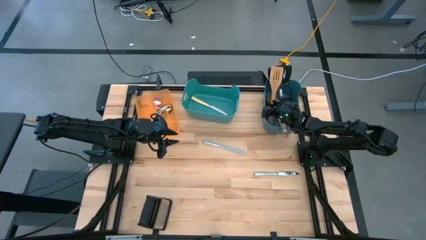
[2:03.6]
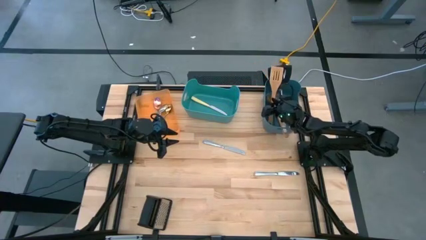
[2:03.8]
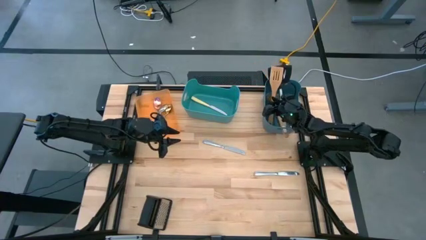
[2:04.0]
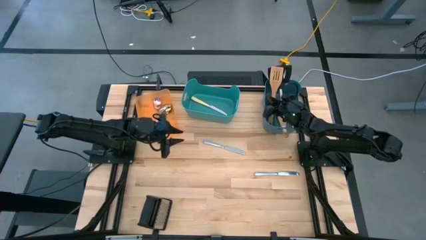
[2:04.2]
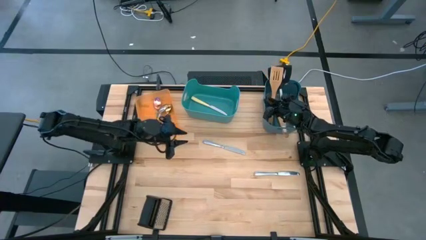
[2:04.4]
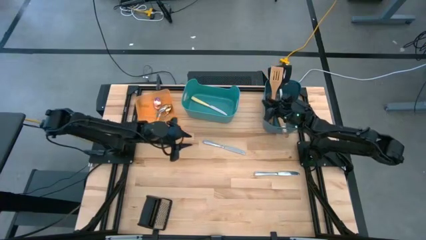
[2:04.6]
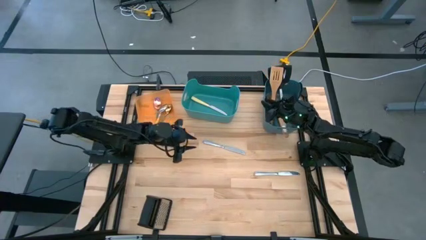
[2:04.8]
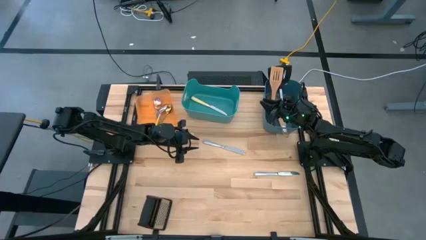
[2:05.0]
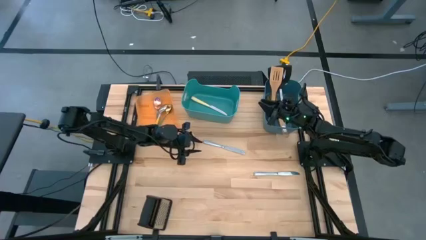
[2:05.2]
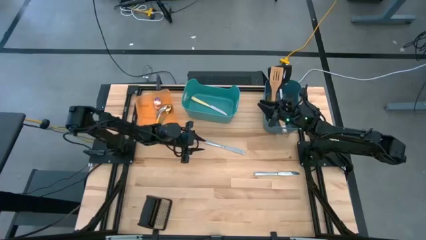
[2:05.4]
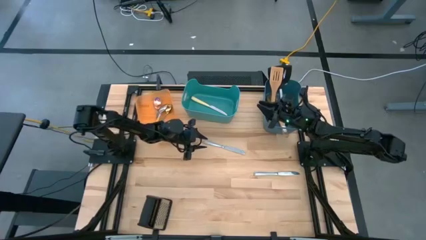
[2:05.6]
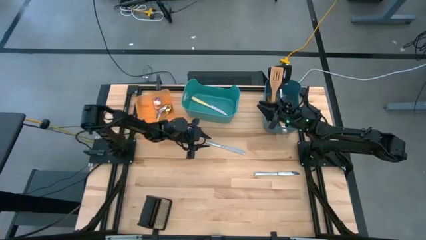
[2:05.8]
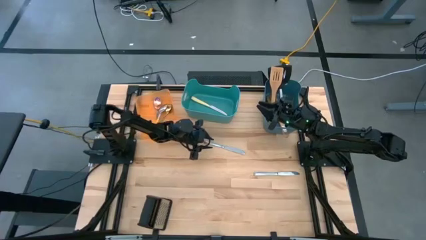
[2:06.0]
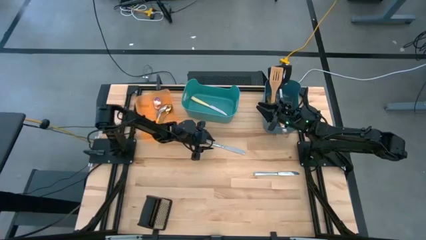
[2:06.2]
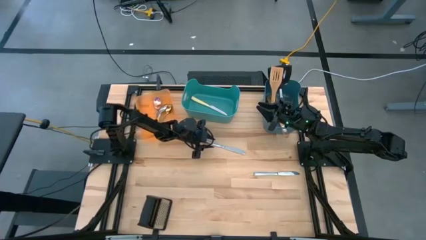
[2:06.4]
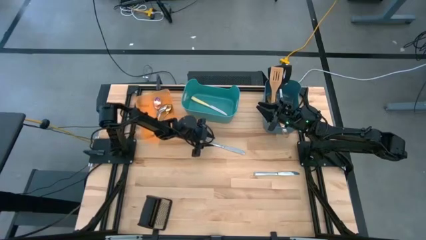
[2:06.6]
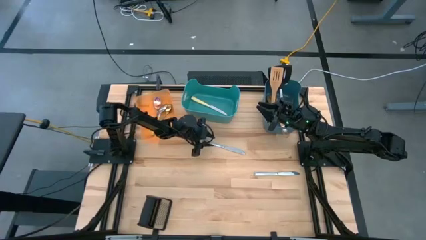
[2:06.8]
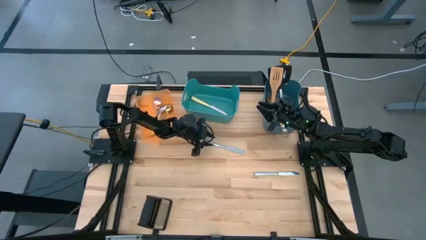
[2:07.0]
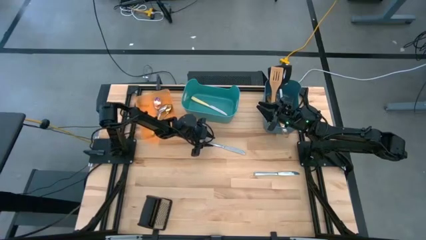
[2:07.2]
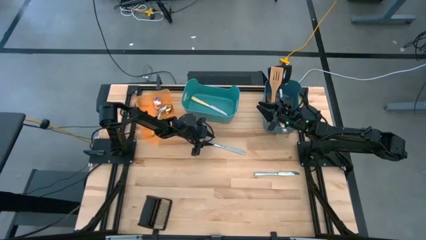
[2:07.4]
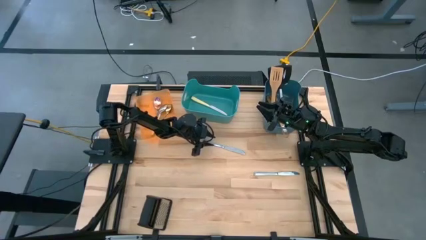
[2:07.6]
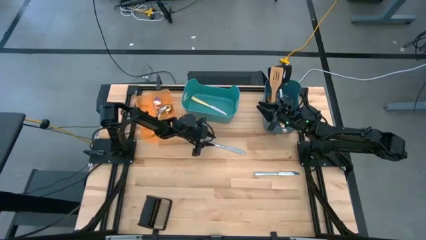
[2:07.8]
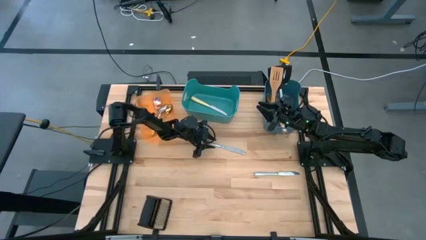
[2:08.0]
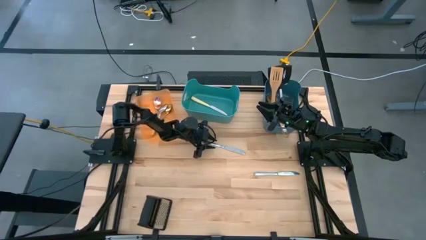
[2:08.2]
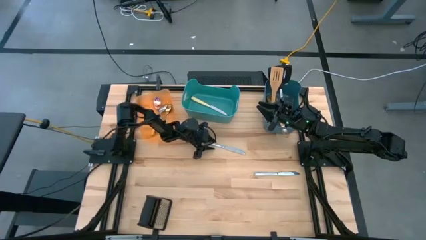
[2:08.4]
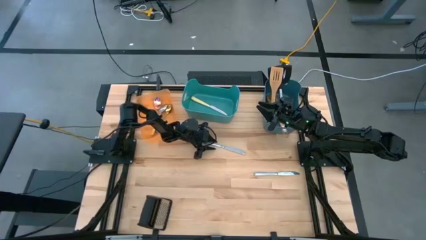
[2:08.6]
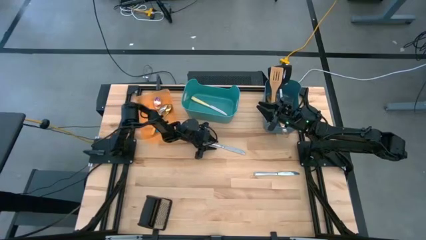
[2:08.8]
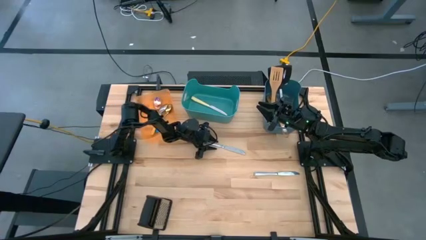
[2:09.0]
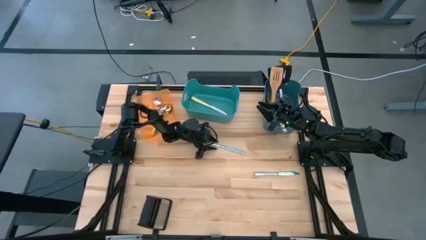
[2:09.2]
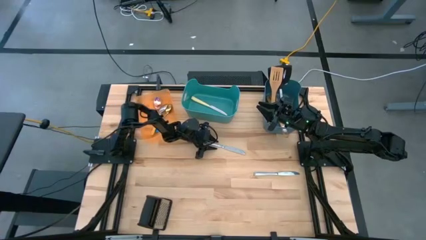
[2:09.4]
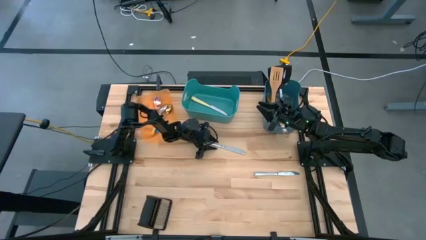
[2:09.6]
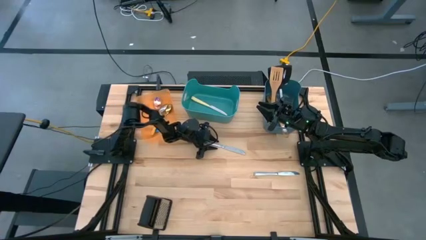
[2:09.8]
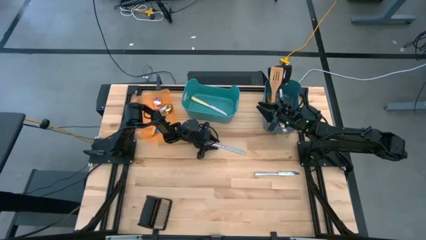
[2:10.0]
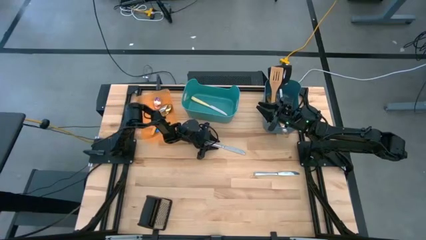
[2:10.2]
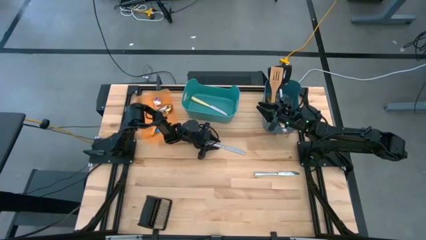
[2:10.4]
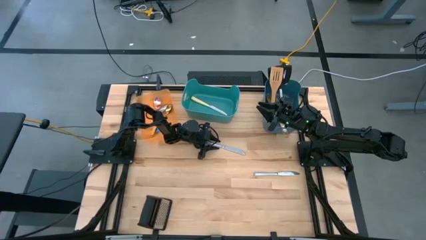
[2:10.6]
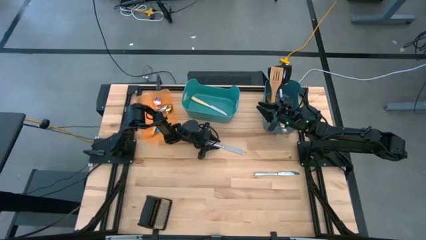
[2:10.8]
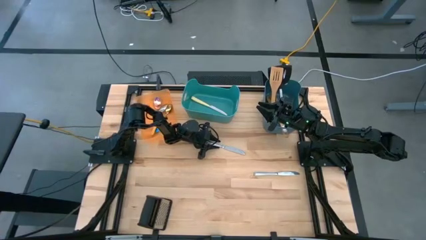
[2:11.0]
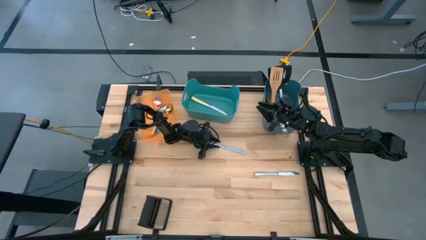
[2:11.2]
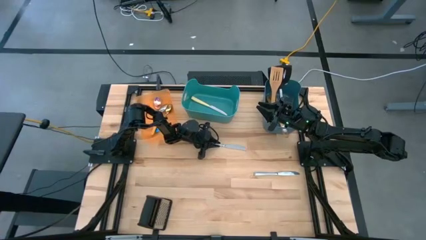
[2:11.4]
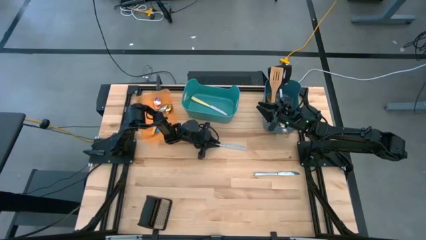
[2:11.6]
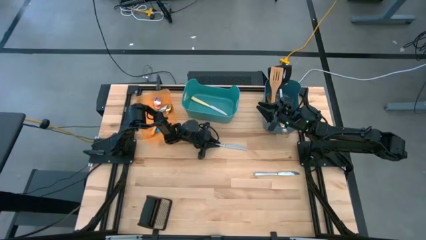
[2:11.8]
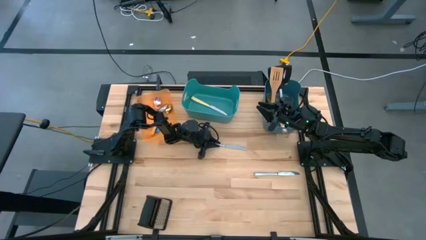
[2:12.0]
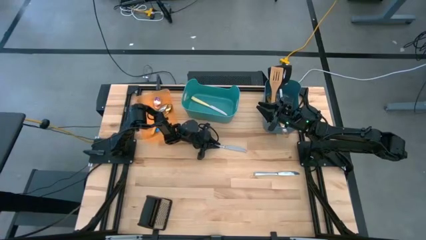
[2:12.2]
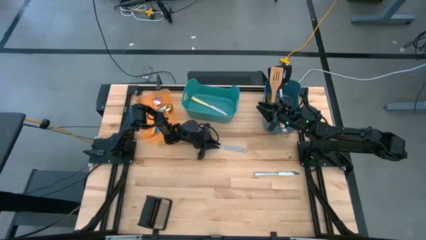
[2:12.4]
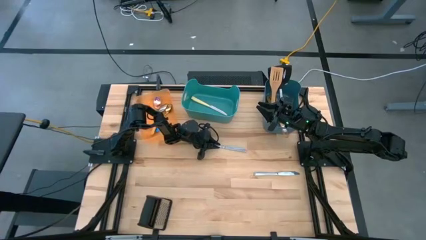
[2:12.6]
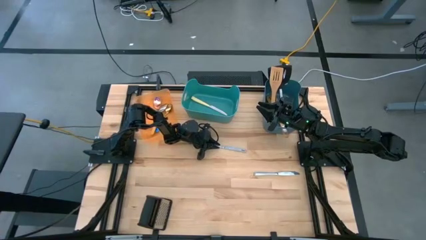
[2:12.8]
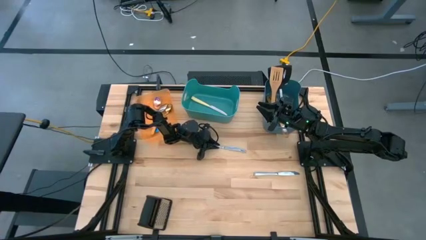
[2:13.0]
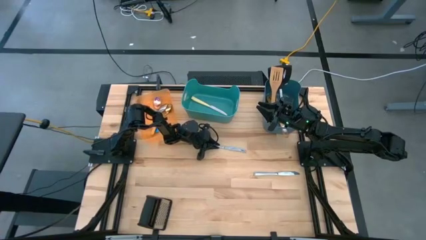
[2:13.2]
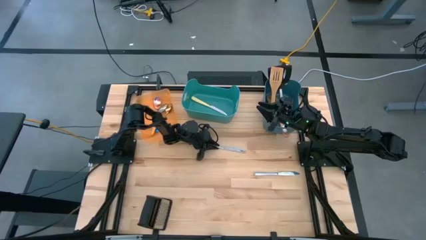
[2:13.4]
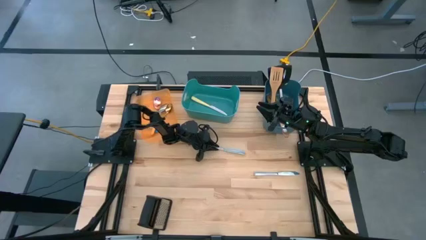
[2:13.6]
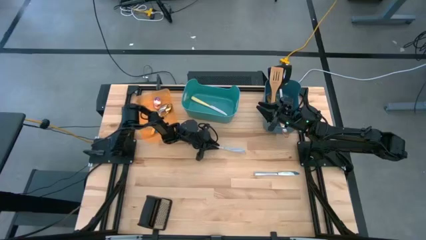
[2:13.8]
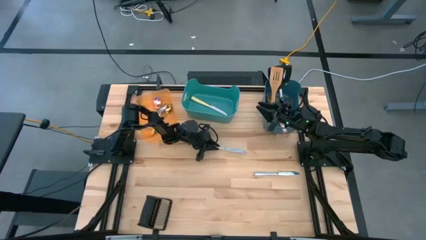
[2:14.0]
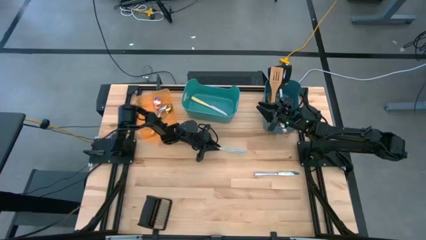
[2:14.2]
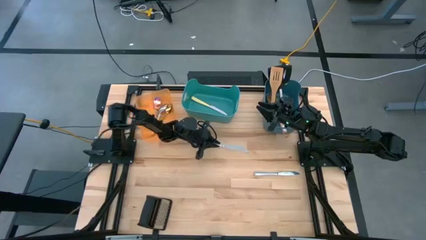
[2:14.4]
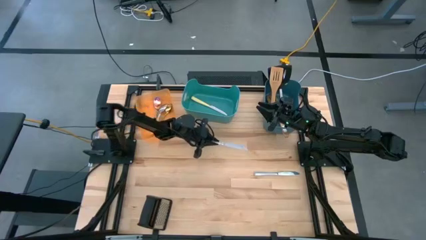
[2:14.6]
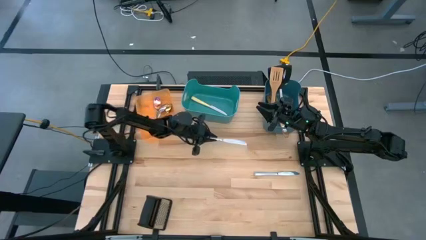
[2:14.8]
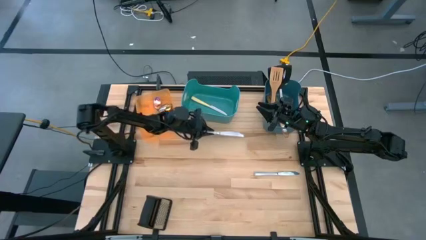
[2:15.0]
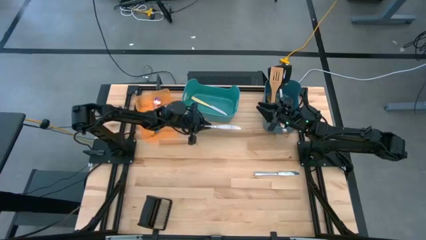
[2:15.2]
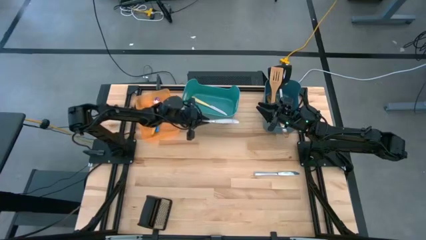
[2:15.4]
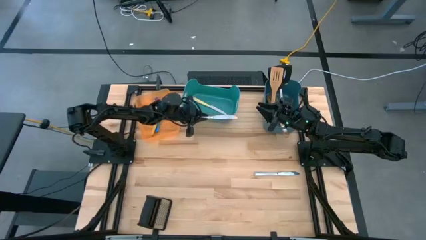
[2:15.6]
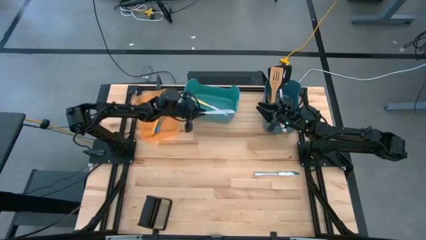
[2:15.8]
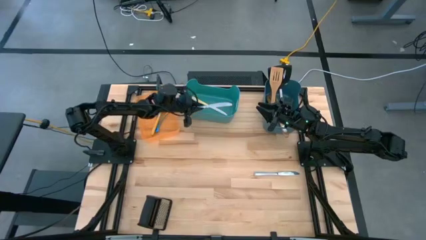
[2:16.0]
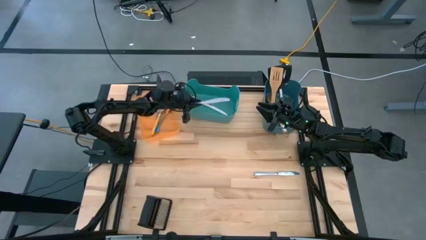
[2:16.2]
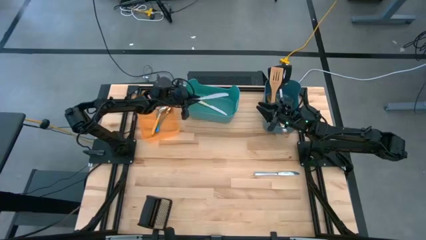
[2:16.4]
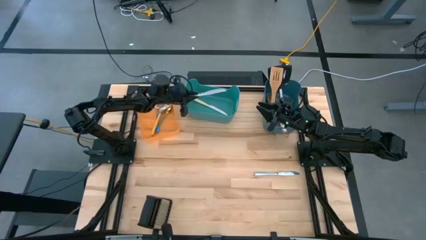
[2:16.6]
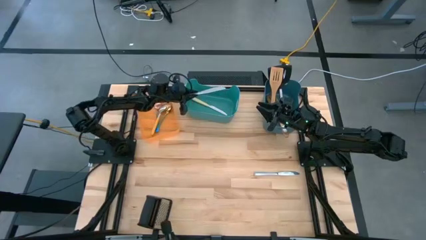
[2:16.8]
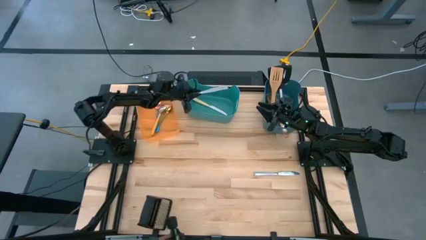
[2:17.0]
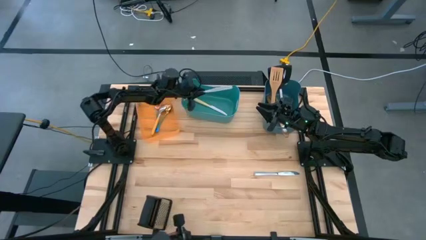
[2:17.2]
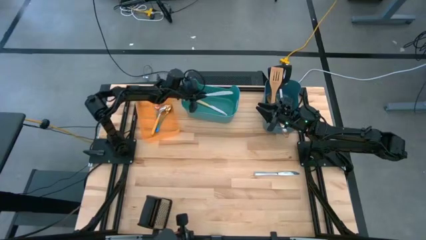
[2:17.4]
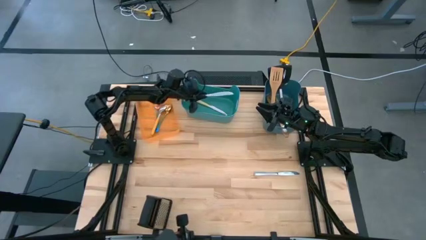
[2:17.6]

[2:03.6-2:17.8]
Task: Pick & Place Kitchen Items
Put the silver knife into the green bin
